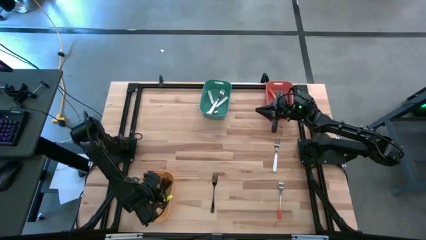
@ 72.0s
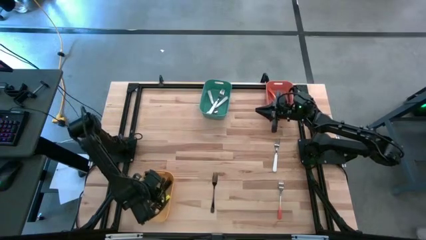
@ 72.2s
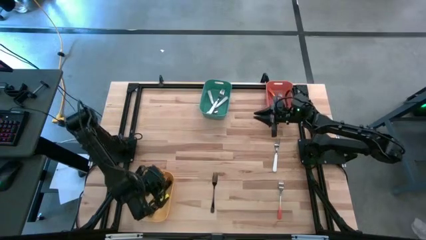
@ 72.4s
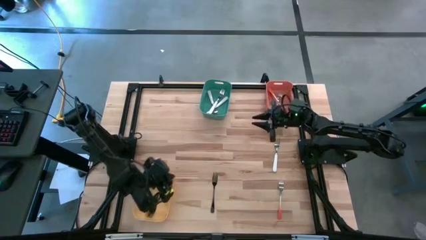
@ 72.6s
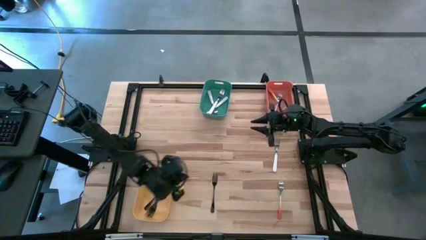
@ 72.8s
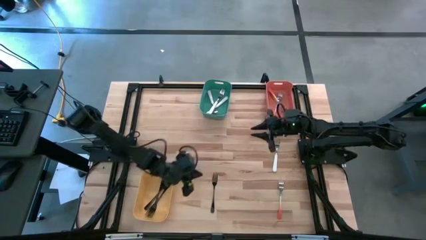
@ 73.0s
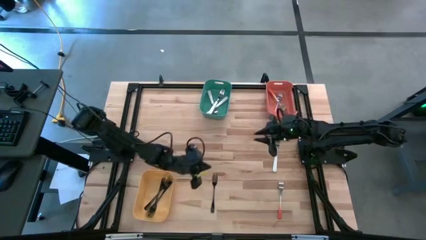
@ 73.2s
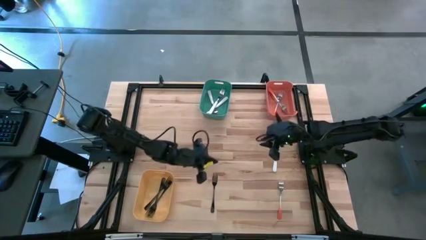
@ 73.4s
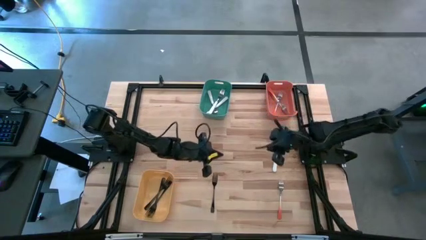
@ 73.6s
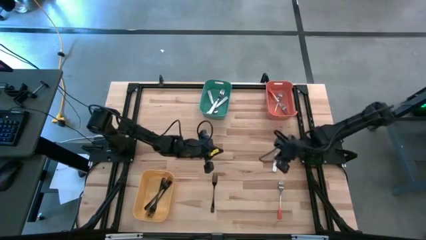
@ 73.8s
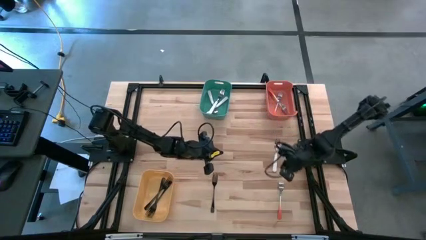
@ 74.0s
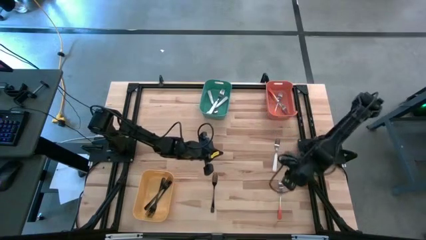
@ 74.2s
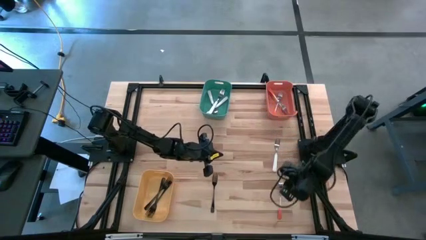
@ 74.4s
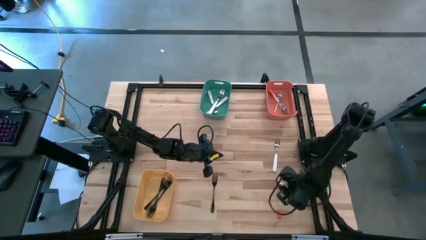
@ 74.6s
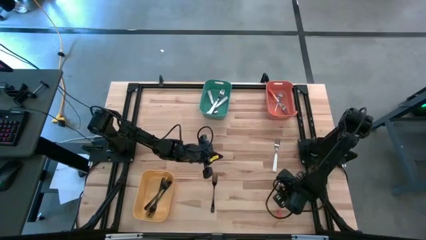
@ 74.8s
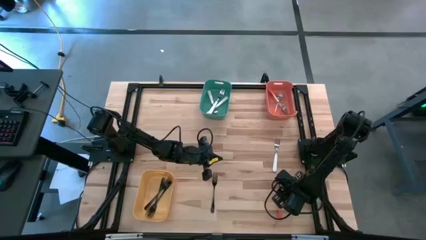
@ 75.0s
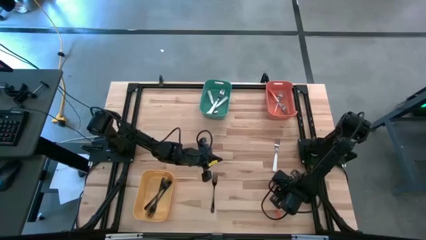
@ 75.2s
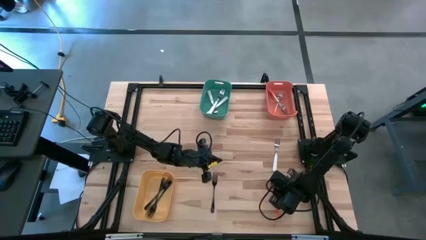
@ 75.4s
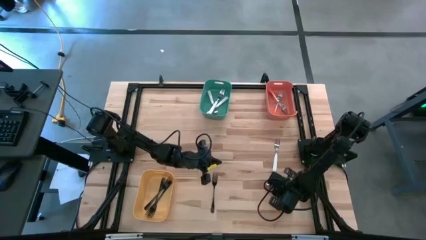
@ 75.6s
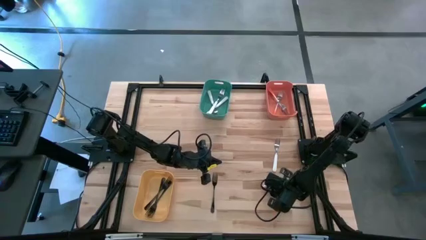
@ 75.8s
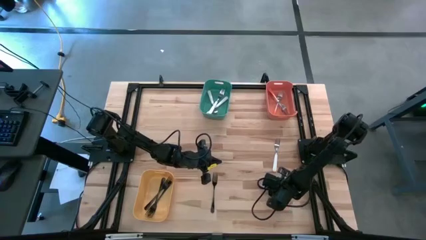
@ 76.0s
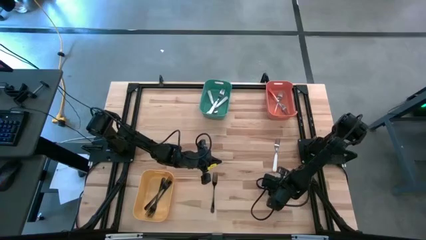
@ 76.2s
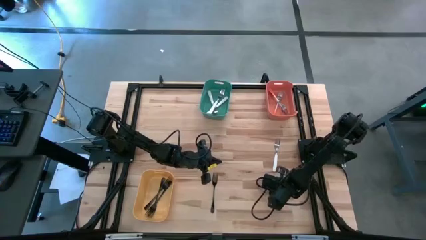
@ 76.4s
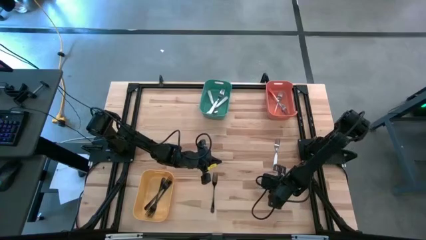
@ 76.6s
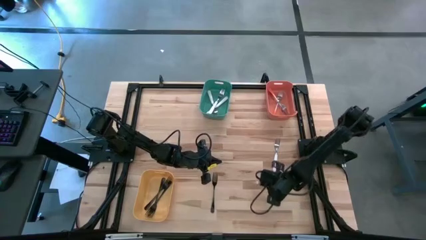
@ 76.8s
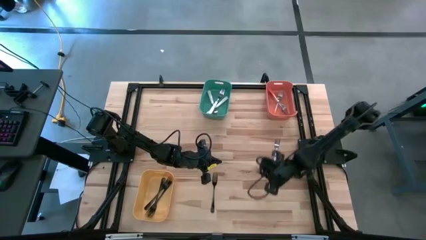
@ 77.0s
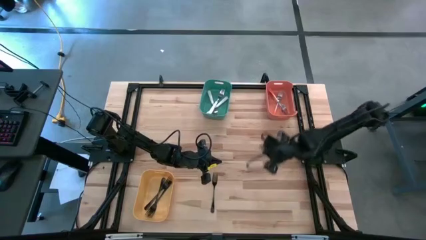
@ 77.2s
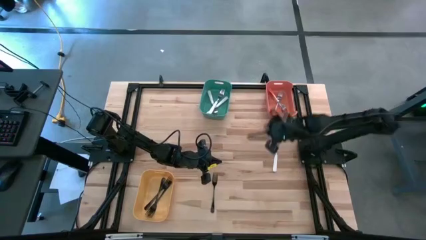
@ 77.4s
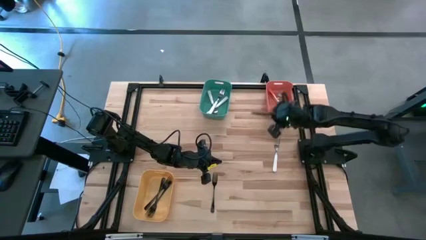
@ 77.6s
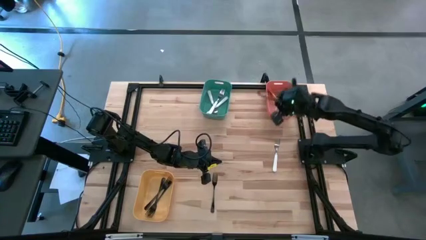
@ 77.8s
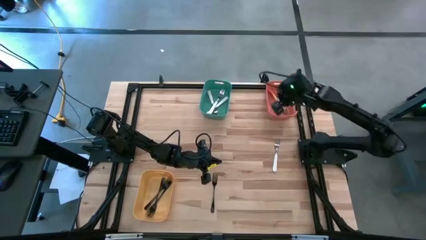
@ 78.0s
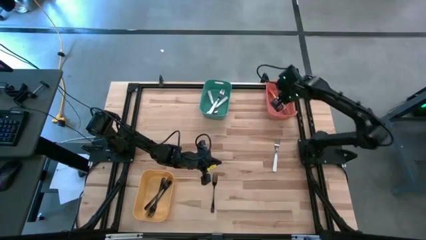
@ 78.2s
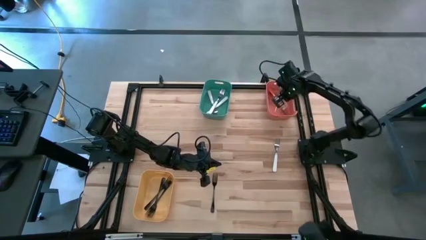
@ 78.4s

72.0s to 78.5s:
Task: Sort silverware by color (type)
Put the orange fork into the orange bin

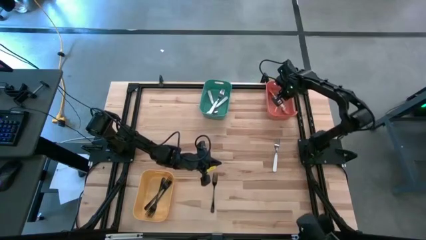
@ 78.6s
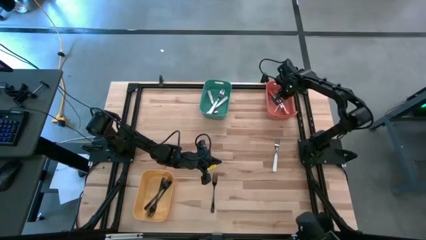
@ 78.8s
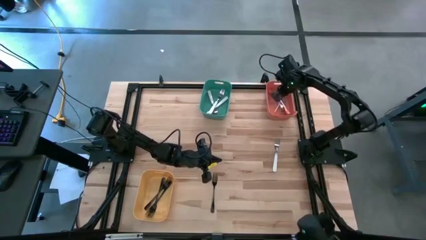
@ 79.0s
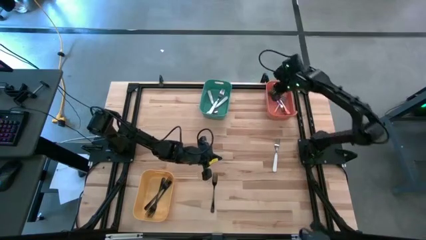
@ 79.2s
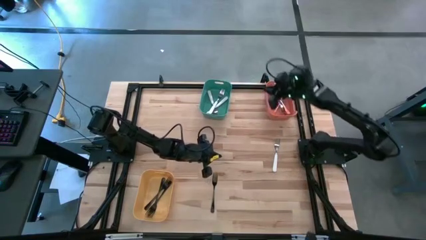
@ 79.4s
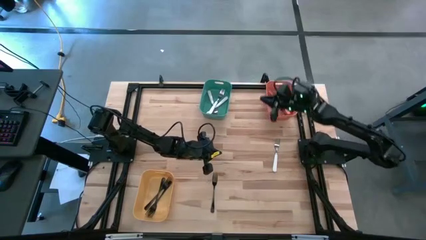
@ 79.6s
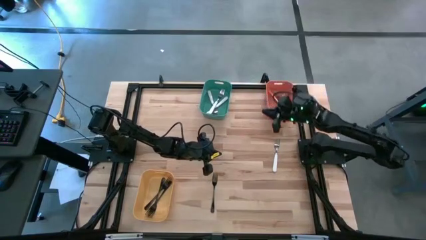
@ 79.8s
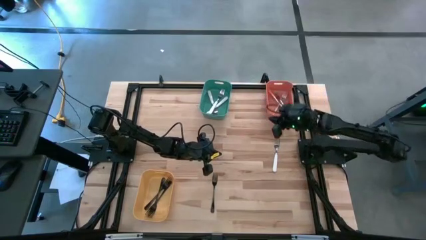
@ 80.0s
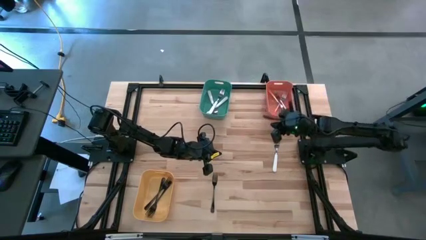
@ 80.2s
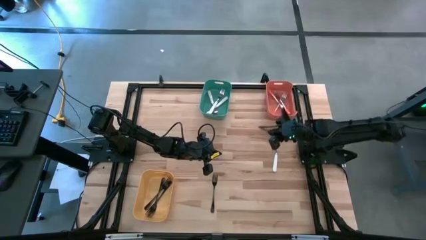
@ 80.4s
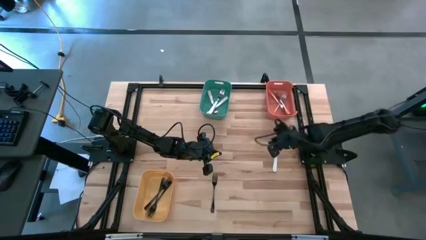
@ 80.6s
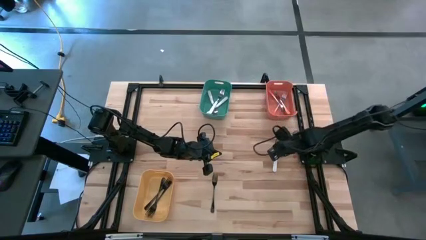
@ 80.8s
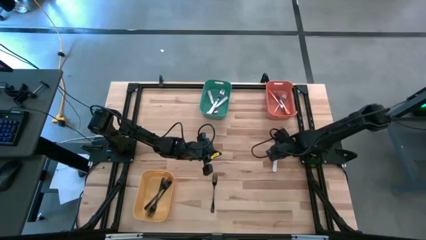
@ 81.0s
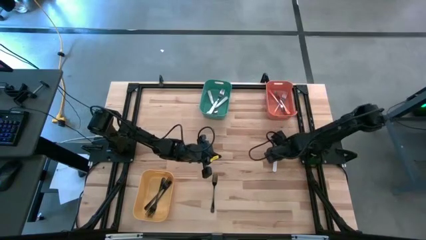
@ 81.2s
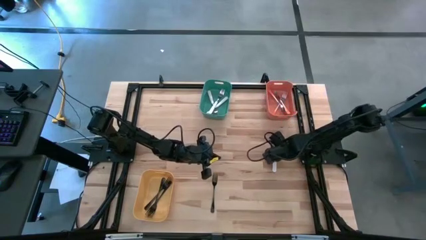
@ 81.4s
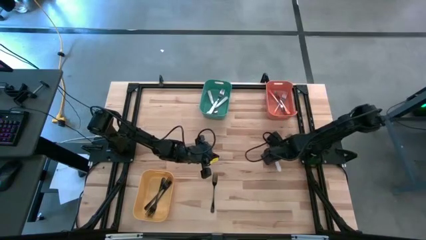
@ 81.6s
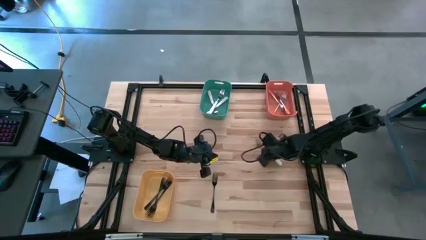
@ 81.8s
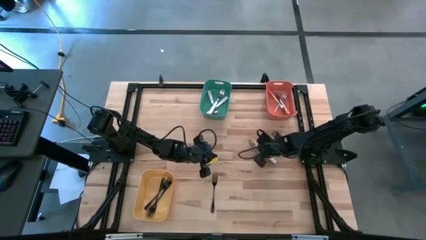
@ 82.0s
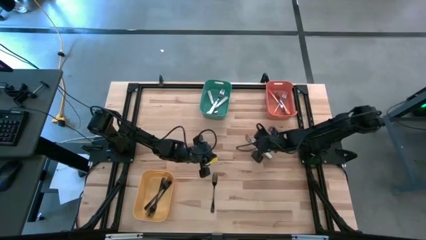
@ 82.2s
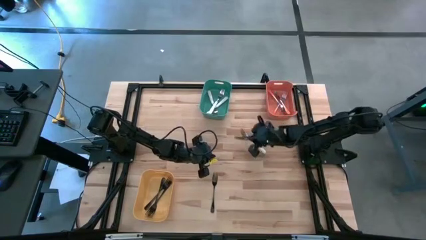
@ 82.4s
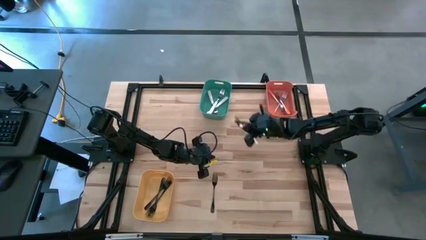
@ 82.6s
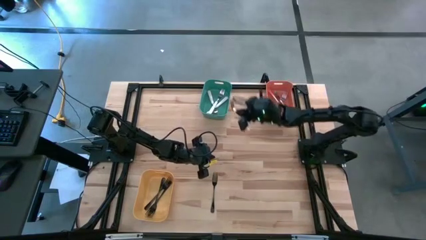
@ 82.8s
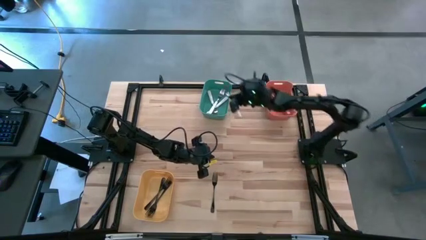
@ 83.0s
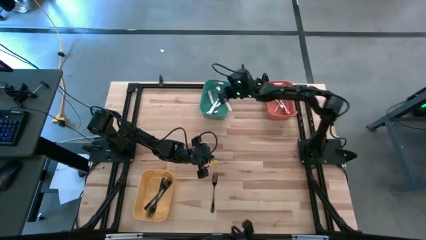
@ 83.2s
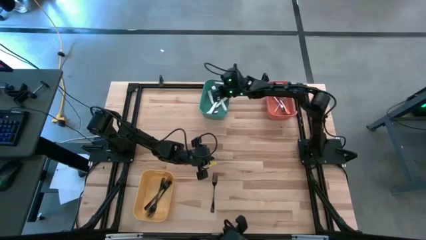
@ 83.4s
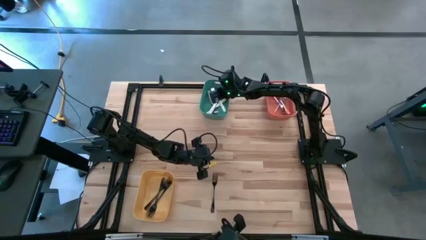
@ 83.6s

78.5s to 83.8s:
Put the white fork into the green bin

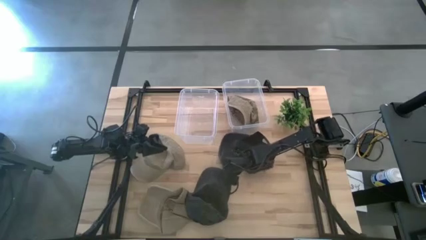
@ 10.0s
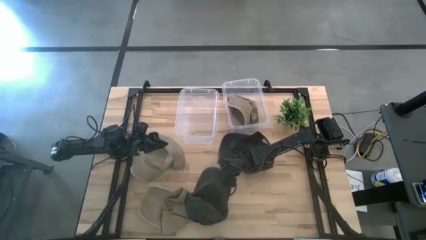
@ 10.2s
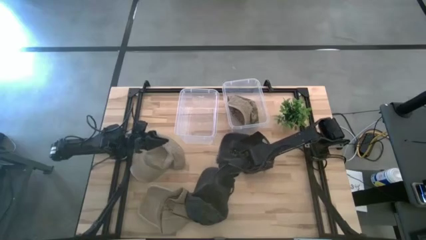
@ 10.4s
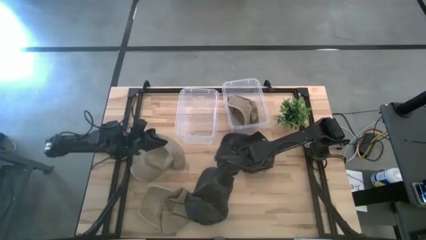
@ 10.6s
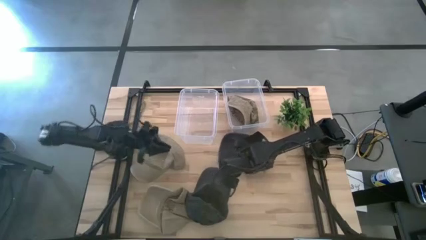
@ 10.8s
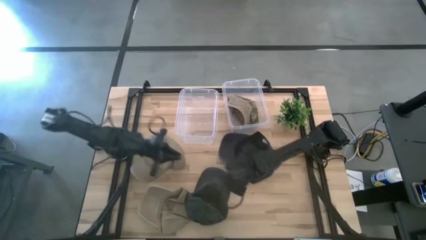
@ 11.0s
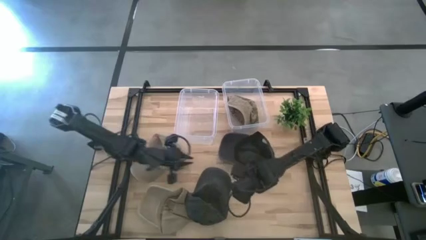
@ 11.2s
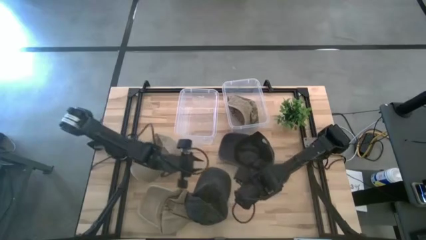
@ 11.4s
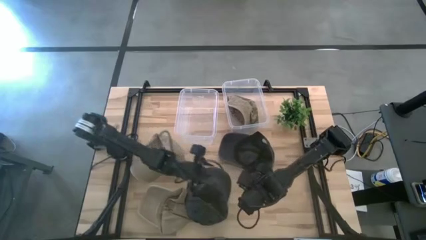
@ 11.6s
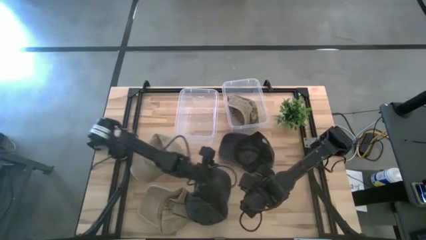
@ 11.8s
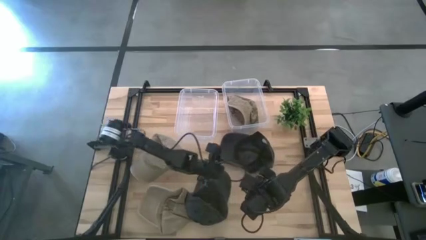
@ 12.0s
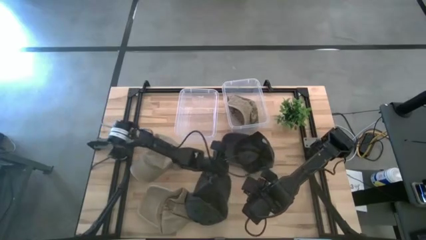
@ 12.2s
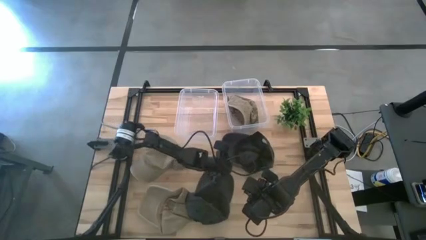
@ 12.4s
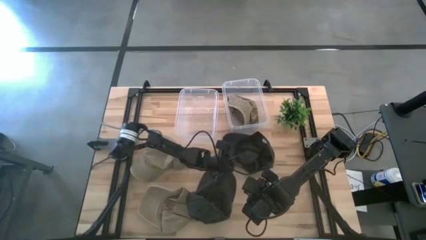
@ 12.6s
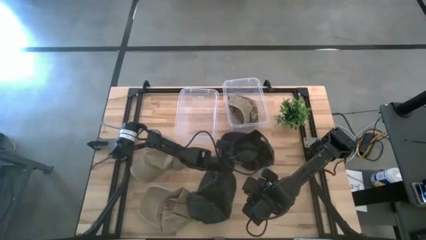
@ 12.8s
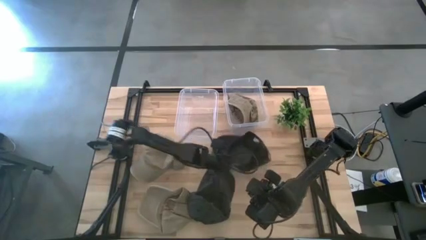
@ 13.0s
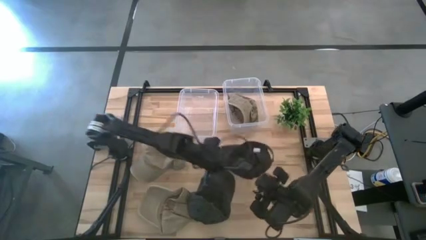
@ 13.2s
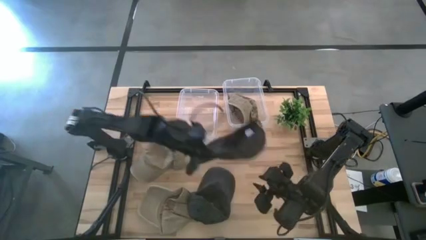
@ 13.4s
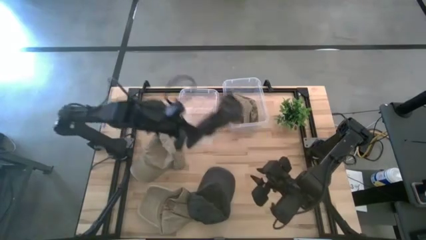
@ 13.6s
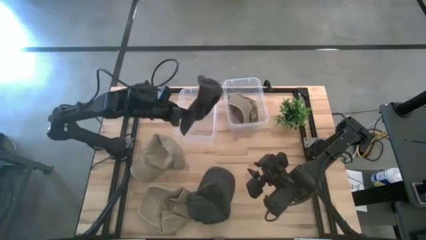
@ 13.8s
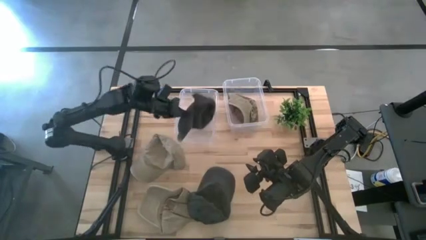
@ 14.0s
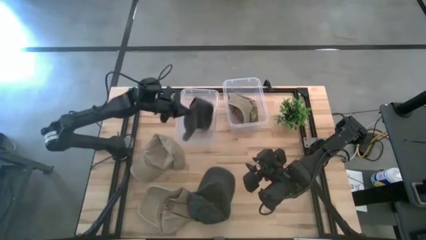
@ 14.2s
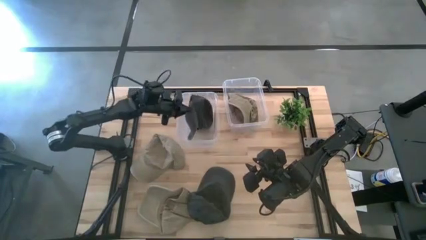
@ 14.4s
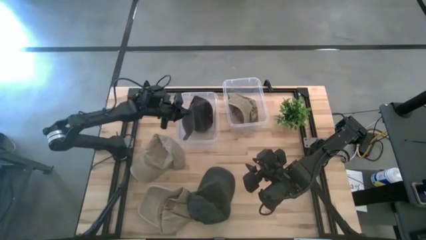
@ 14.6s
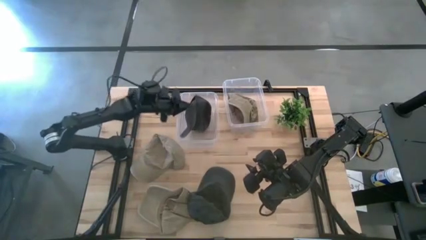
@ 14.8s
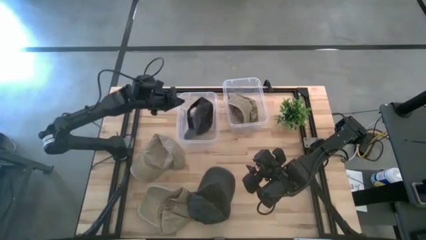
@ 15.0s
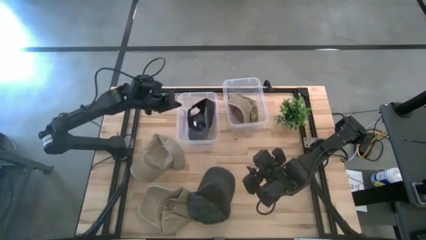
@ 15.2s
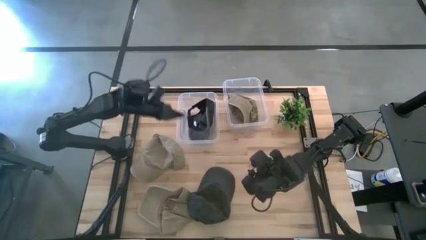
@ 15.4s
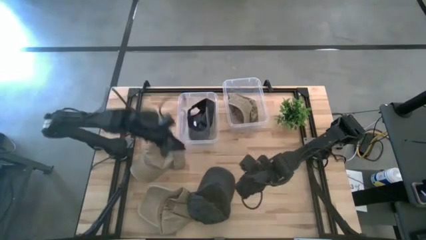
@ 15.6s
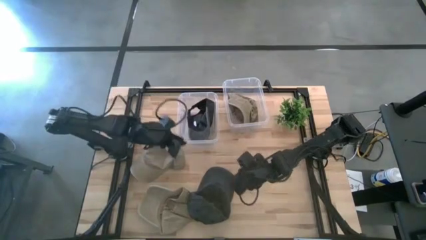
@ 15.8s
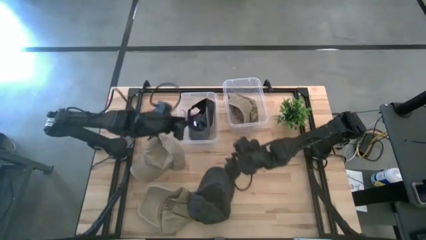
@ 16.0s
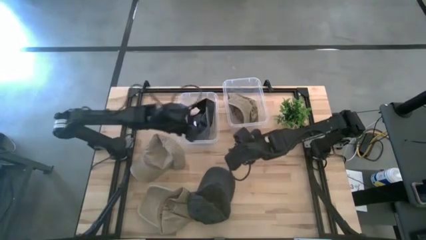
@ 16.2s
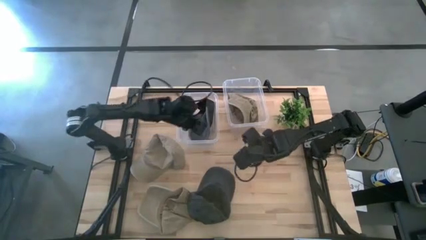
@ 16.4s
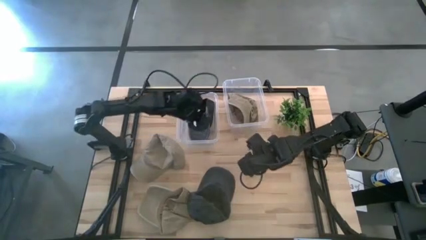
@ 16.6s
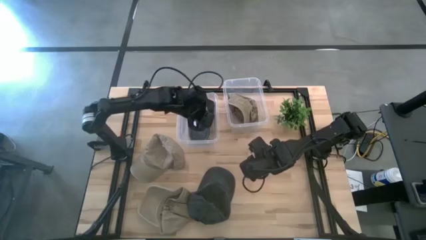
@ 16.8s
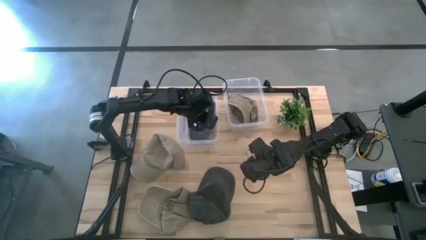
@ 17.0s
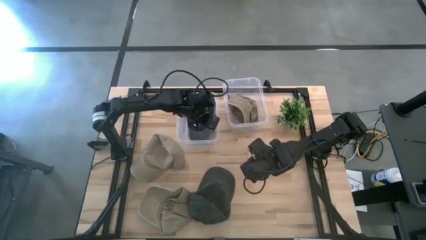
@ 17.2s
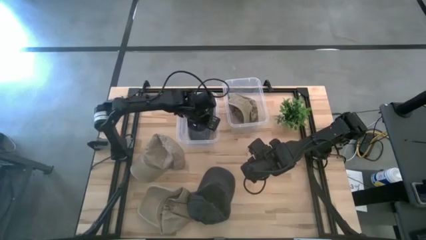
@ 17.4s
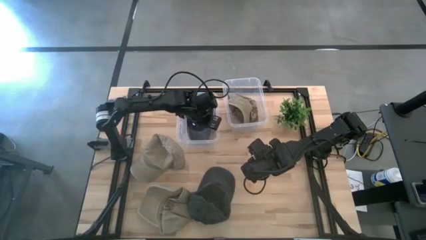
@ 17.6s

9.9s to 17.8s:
Task: Pick & Place hat
Put the top black hat into the left transparent bin
